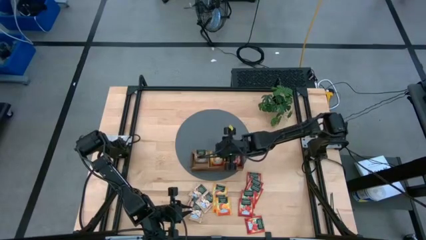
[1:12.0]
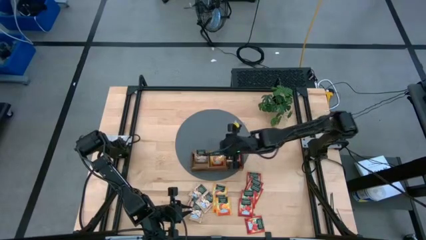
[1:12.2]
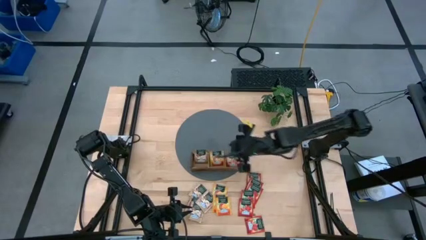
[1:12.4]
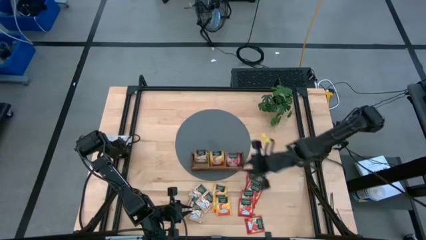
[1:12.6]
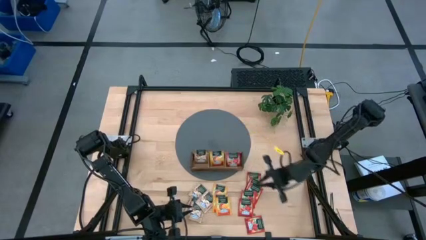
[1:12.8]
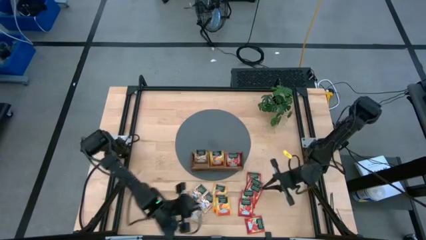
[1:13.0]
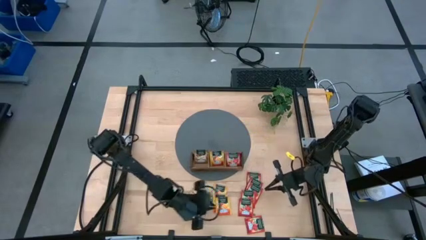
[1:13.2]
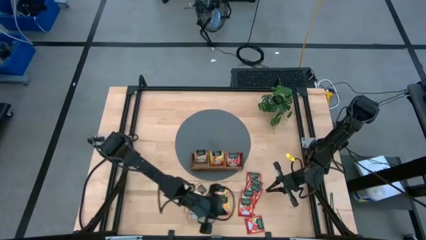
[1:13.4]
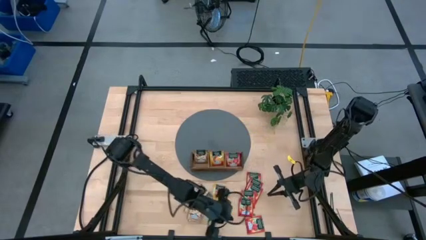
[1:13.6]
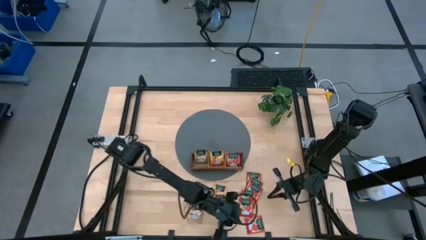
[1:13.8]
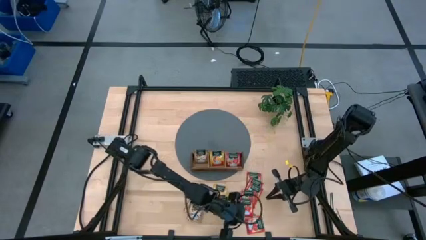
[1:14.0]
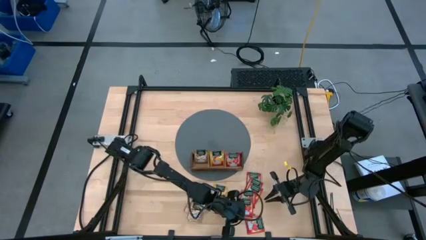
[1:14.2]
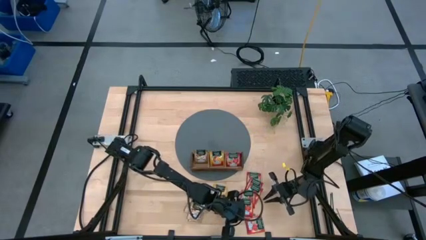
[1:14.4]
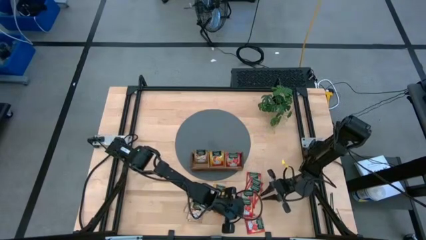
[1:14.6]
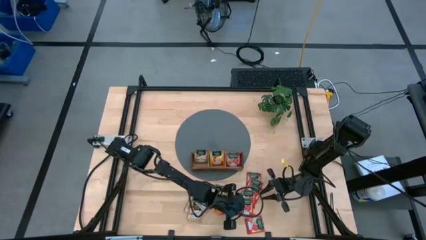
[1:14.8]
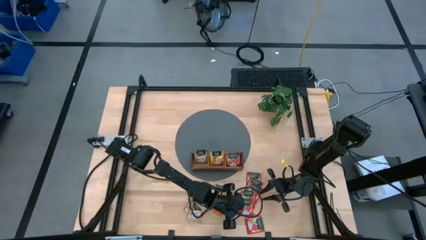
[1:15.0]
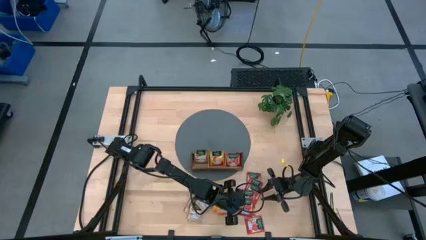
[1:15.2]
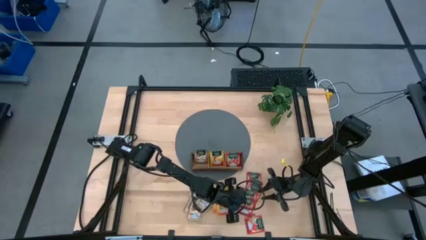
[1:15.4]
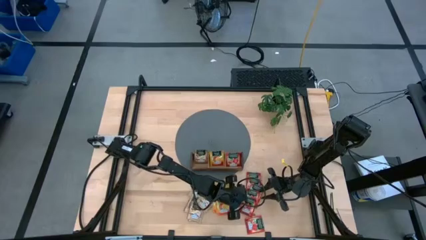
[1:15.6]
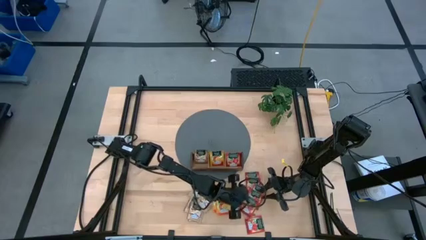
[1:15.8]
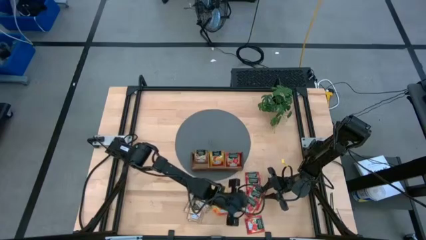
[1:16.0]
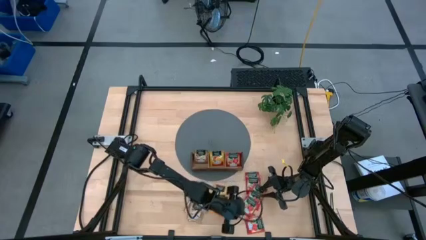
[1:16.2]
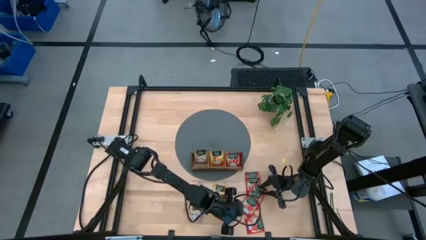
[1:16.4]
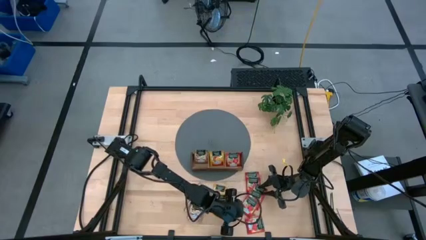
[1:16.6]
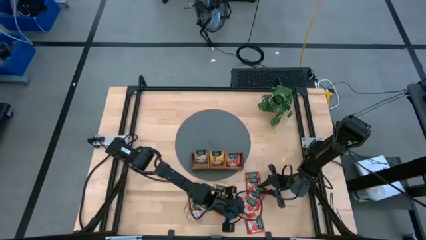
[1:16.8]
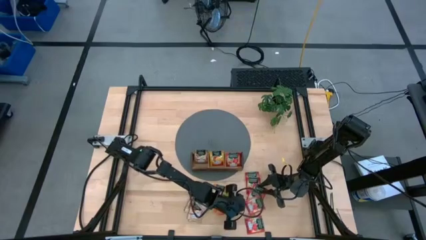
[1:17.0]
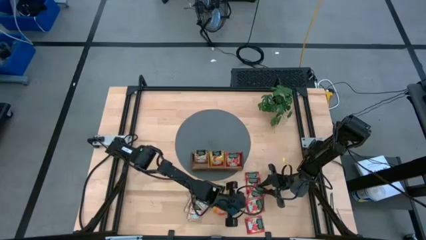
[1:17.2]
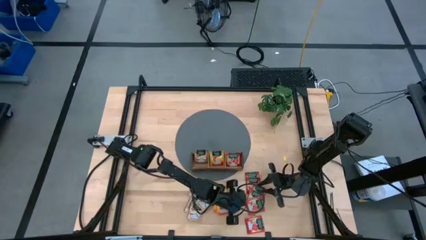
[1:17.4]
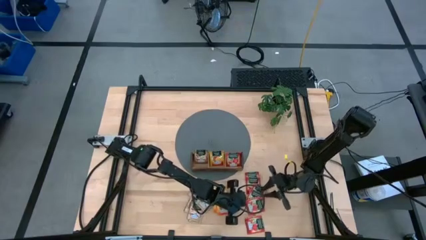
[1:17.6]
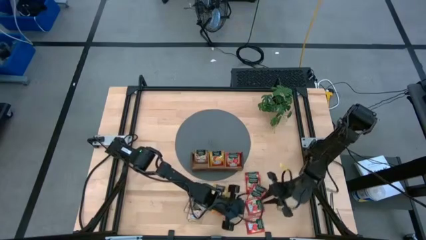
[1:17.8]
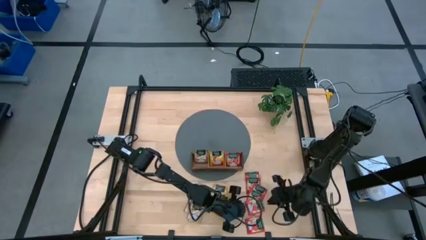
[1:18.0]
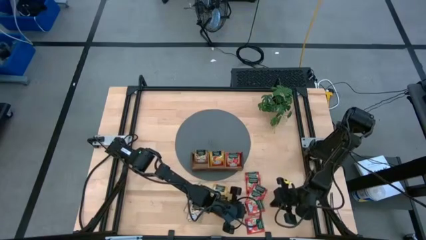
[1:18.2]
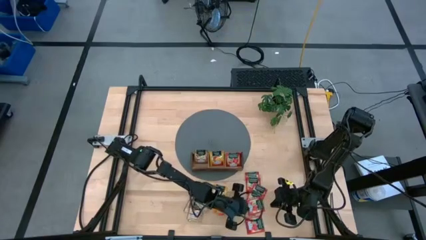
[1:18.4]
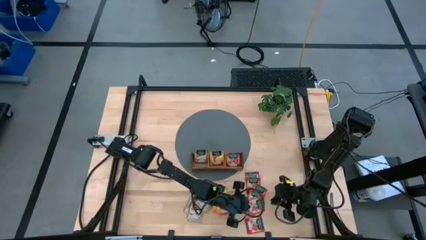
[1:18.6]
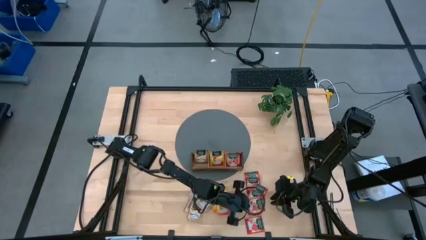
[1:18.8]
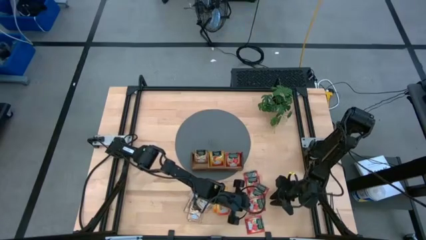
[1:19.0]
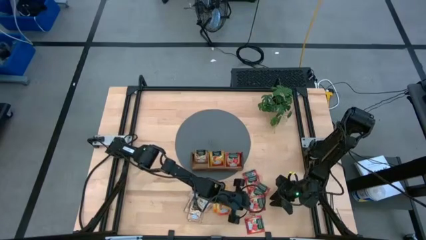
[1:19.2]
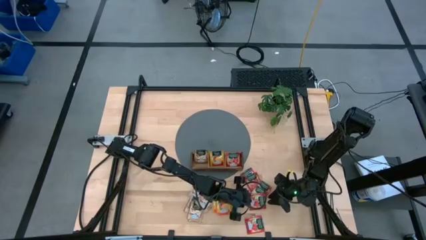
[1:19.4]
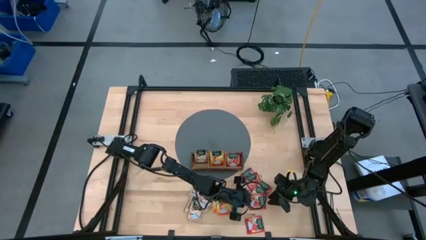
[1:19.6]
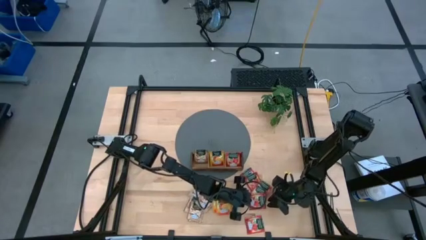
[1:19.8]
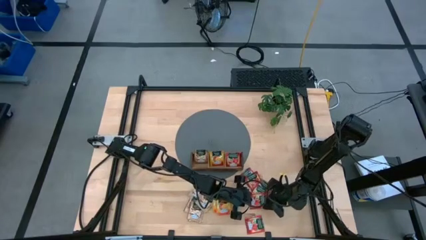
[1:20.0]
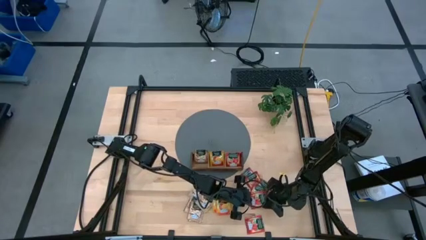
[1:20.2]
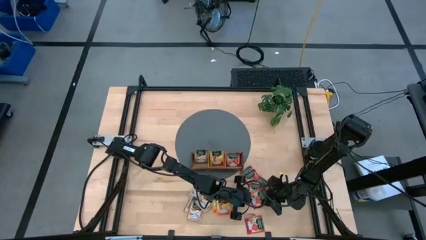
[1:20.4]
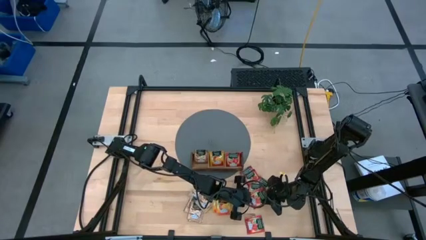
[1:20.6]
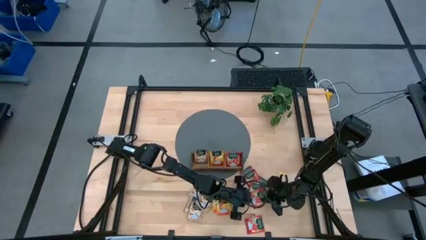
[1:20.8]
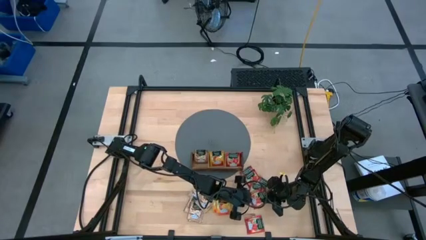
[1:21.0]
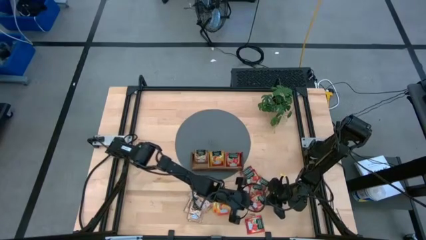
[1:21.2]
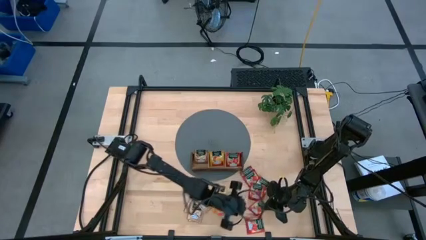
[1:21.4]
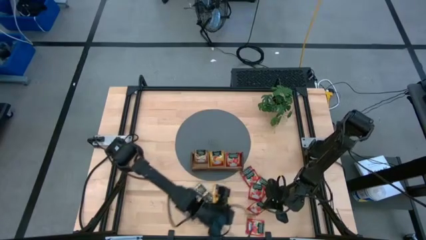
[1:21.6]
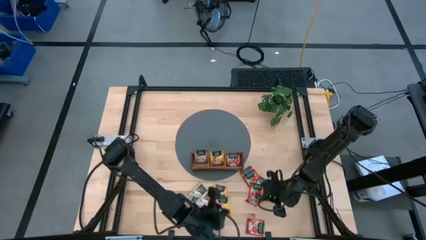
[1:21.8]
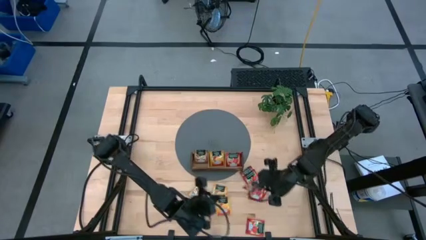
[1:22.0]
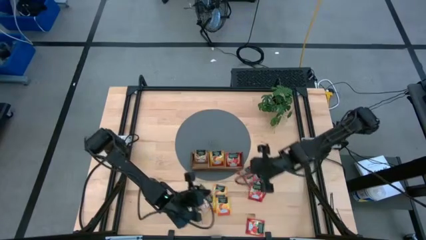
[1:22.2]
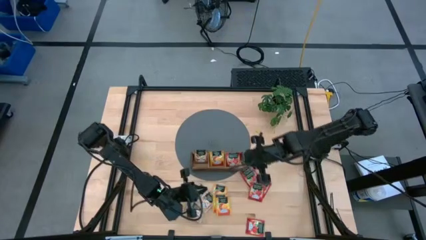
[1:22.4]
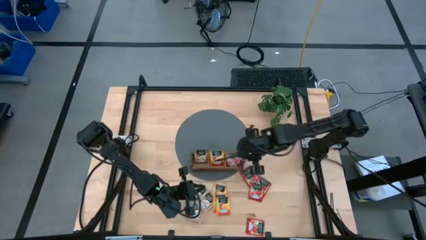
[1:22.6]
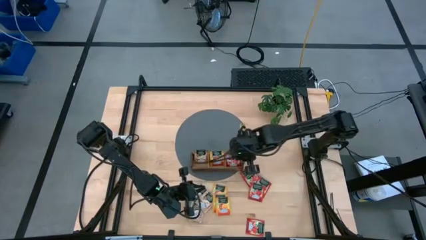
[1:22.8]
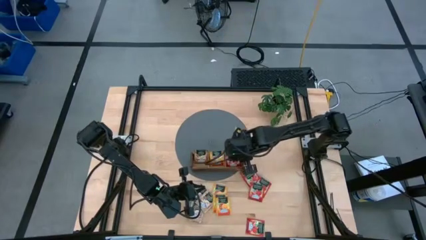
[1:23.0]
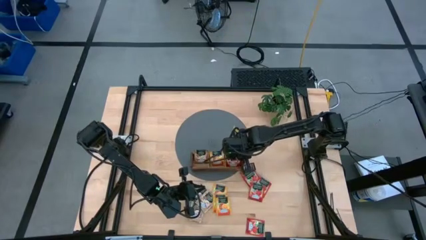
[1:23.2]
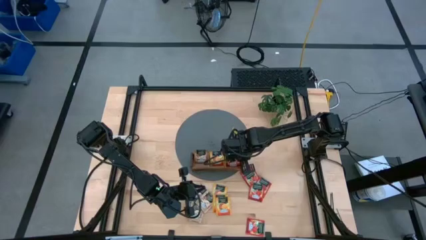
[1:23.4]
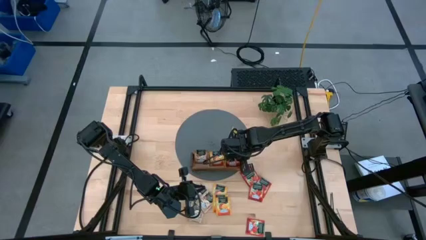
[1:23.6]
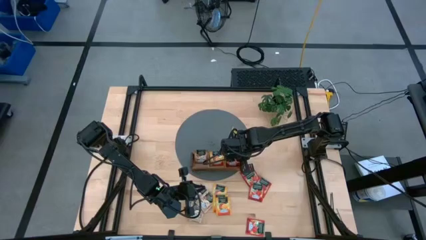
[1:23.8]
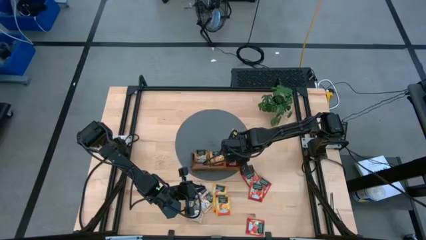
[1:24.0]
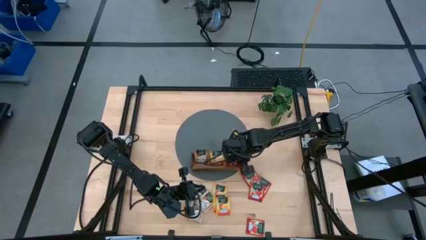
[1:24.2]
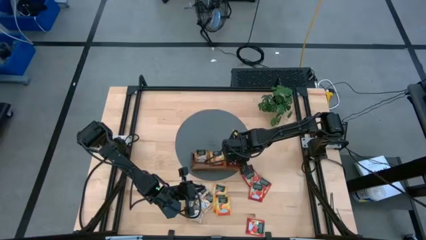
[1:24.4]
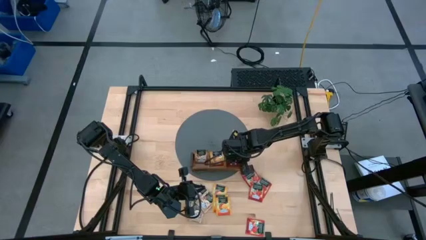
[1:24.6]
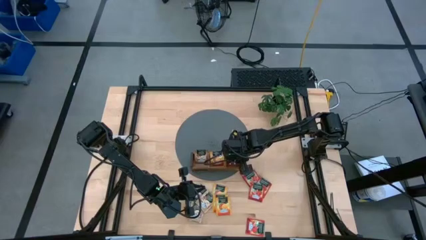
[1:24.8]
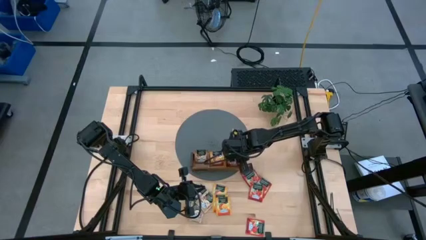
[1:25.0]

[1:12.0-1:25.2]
Task: Pick & Place Tea
Put the red tea bag into the right section of the wooden organizer

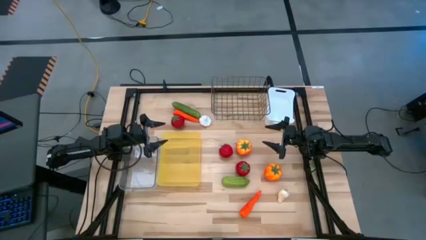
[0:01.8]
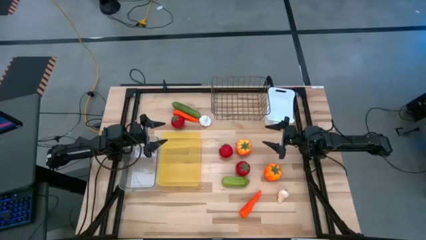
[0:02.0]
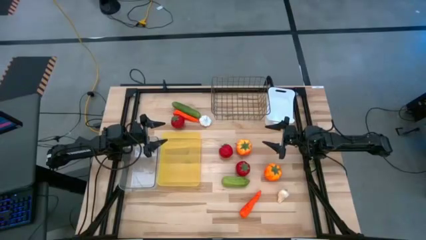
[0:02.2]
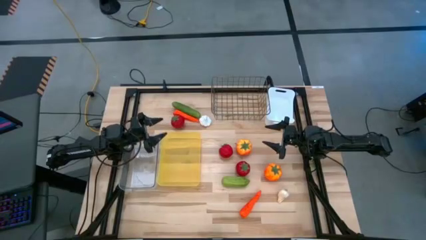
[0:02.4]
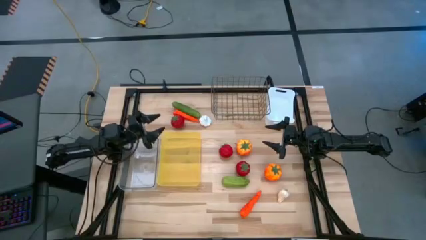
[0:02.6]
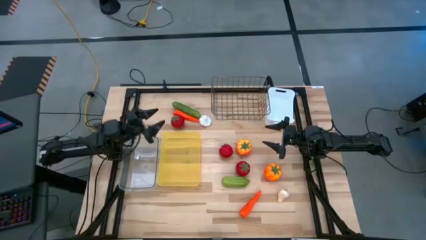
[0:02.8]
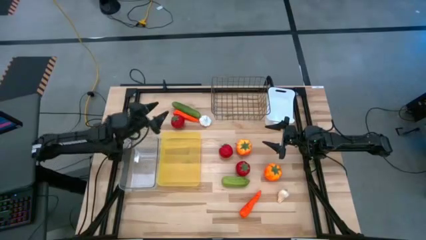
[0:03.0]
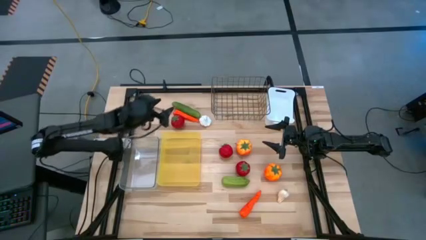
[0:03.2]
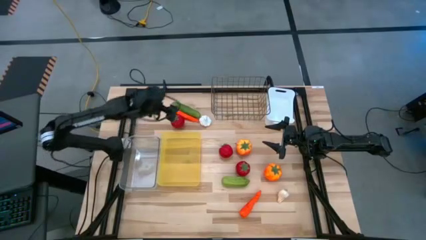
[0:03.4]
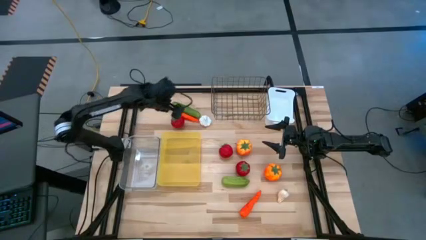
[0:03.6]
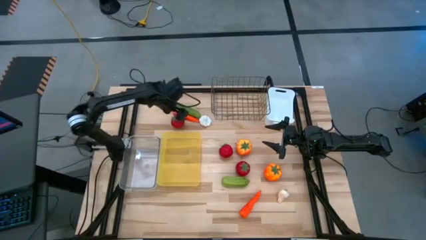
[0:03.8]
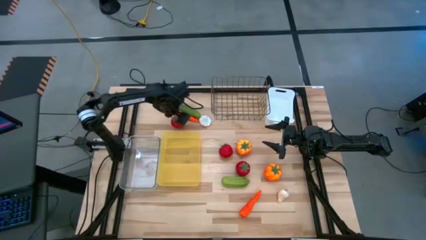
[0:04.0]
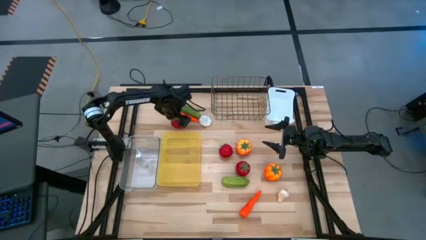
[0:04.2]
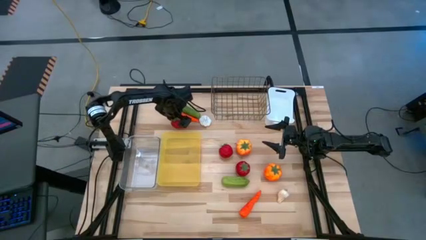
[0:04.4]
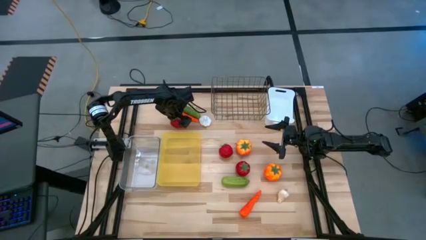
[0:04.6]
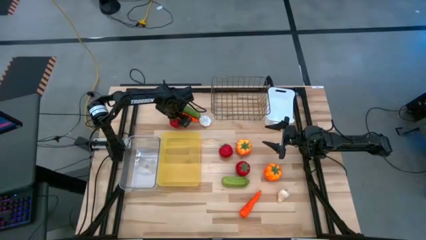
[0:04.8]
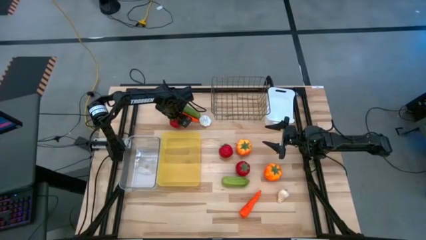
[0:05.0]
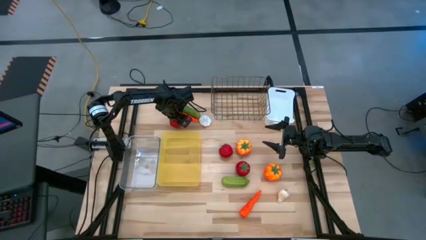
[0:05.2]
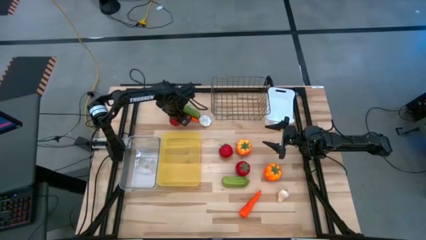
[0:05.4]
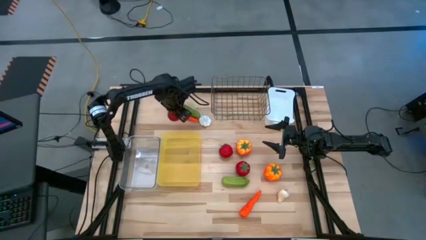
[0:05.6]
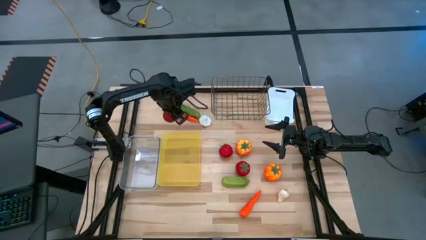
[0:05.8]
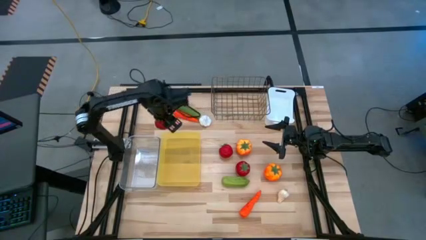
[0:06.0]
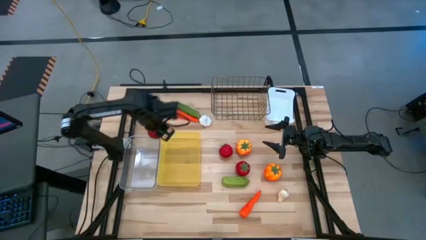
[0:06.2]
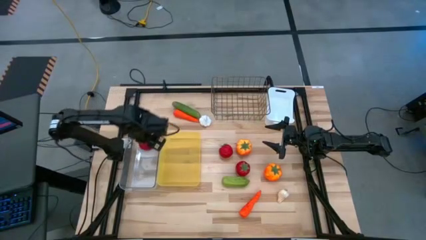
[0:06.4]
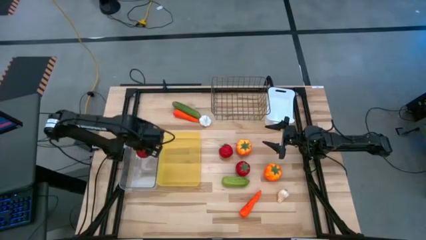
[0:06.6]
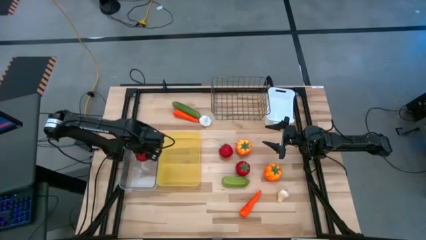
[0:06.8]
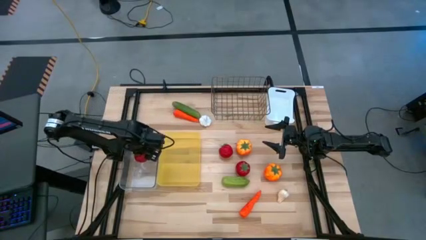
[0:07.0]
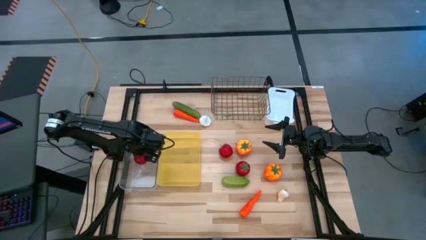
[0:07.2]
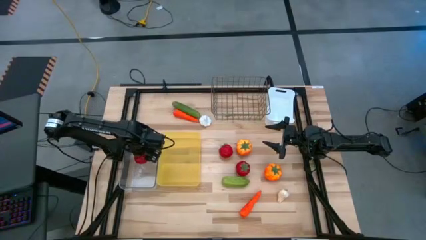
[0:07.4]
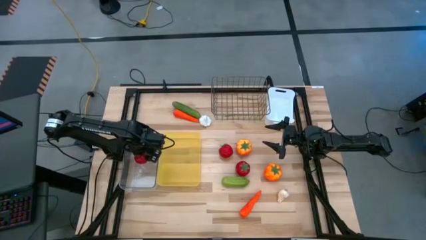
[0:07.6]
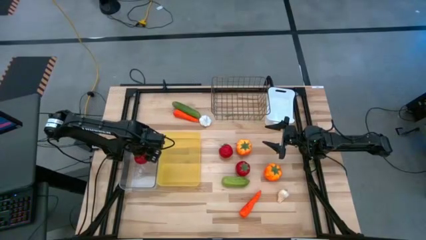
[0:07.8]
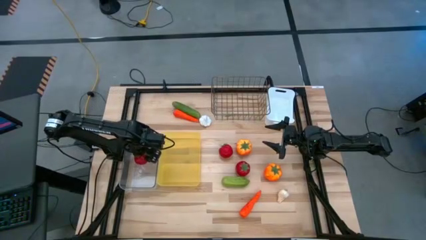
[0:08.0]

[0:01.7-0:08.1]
Task: Sort produce into baskets
Put the top left red tomato into the transparent bin
